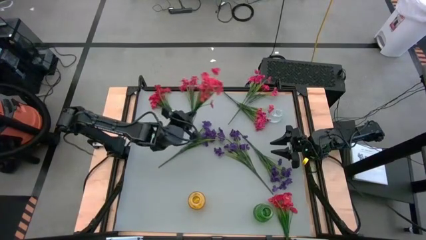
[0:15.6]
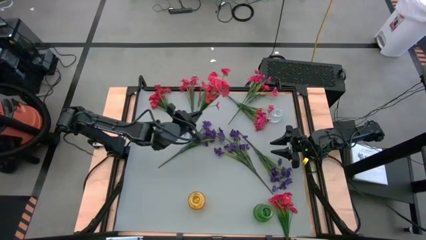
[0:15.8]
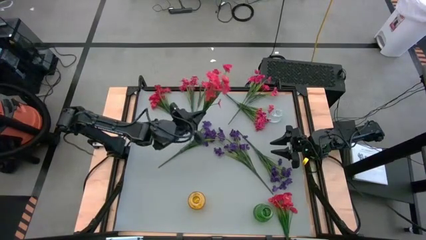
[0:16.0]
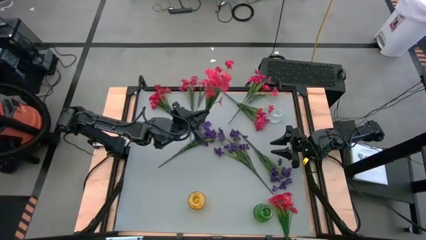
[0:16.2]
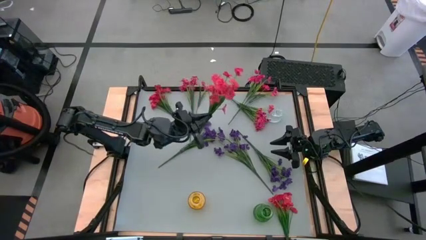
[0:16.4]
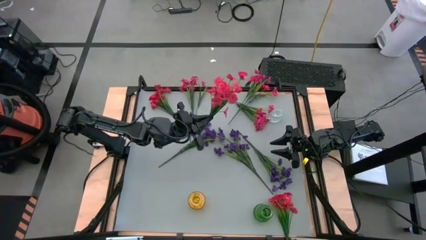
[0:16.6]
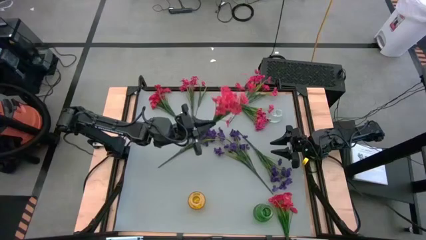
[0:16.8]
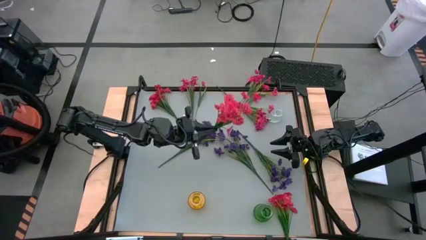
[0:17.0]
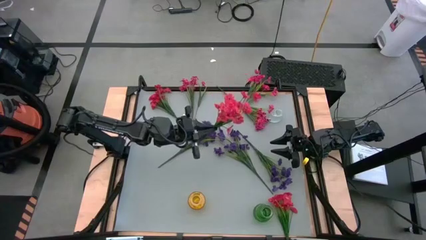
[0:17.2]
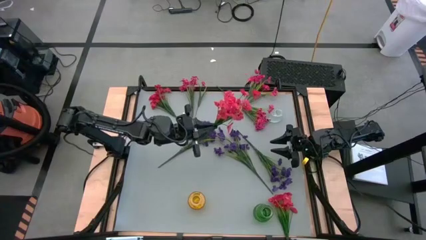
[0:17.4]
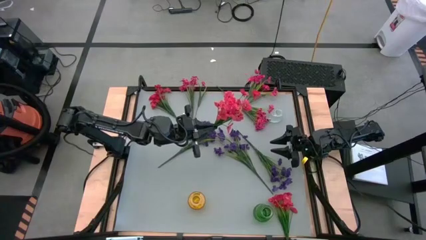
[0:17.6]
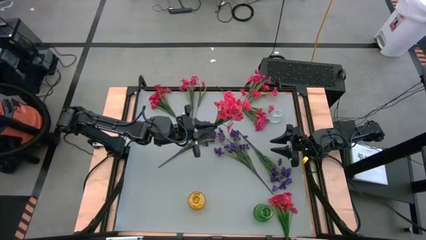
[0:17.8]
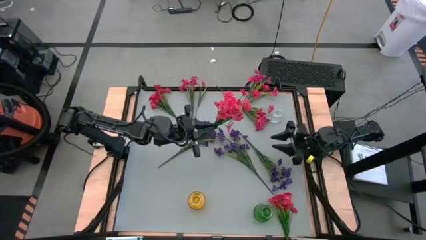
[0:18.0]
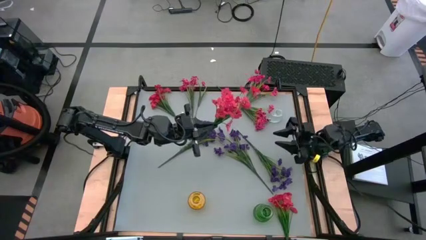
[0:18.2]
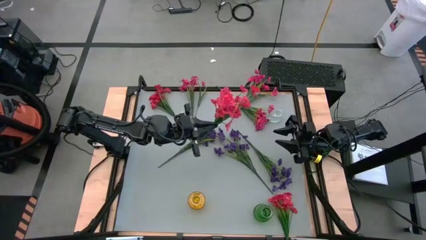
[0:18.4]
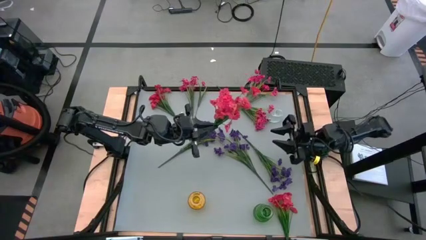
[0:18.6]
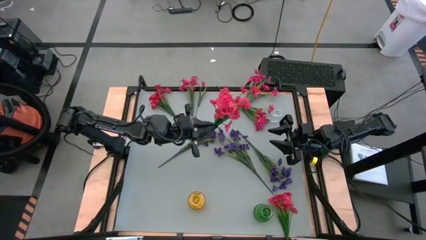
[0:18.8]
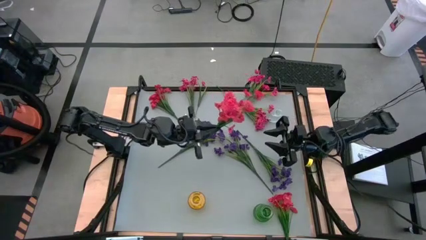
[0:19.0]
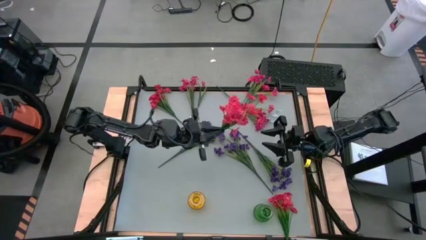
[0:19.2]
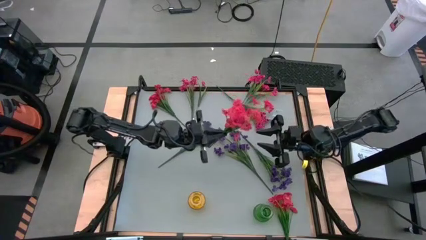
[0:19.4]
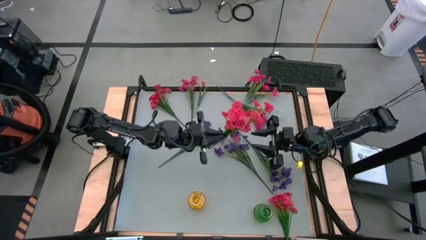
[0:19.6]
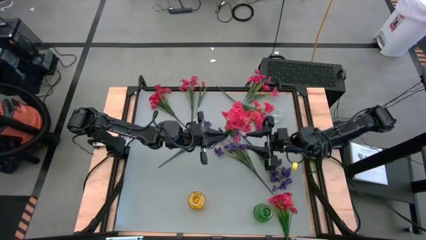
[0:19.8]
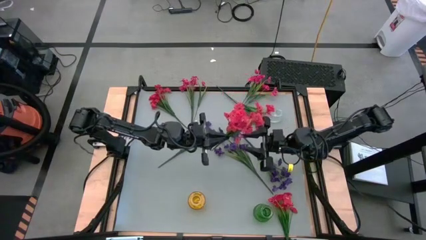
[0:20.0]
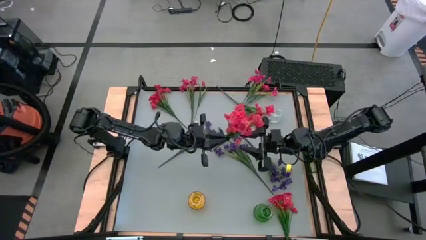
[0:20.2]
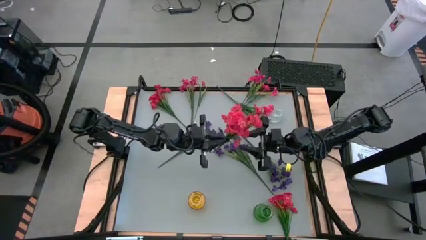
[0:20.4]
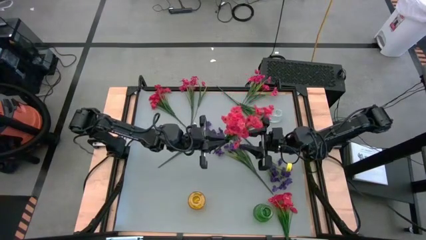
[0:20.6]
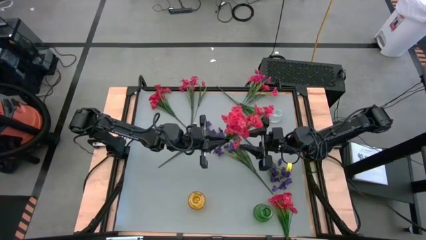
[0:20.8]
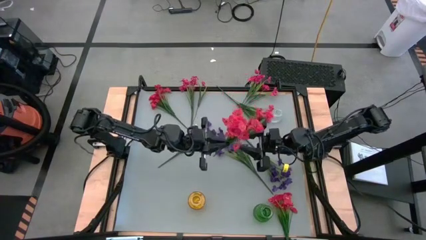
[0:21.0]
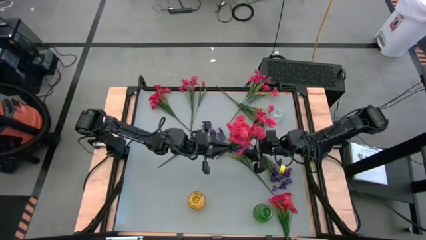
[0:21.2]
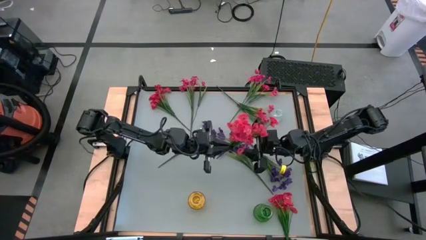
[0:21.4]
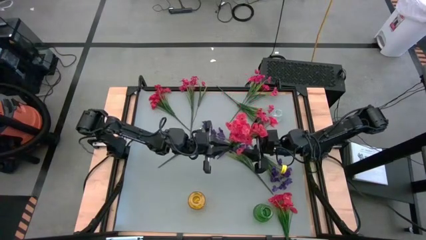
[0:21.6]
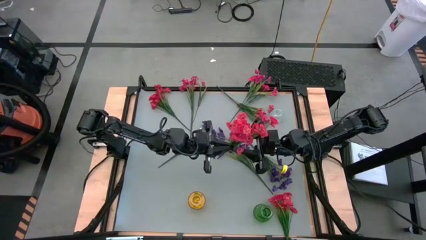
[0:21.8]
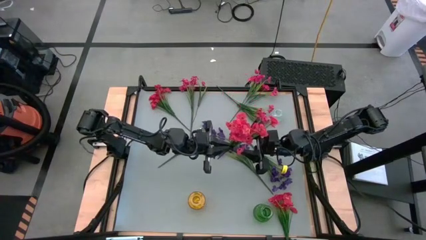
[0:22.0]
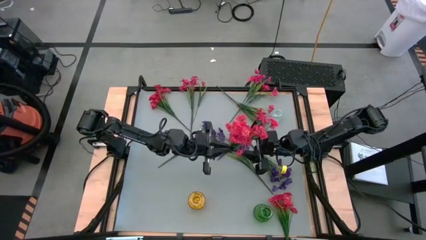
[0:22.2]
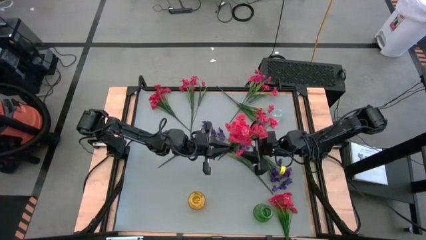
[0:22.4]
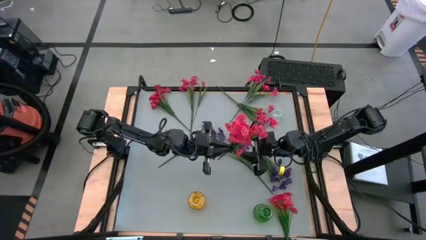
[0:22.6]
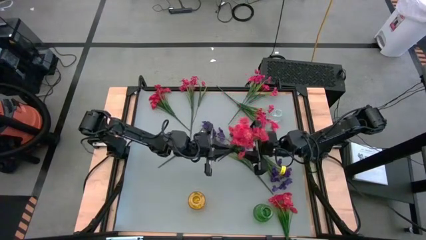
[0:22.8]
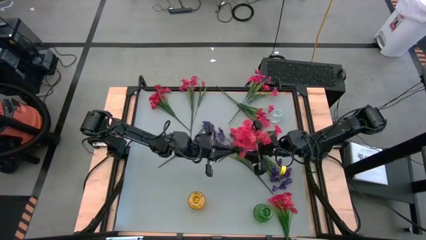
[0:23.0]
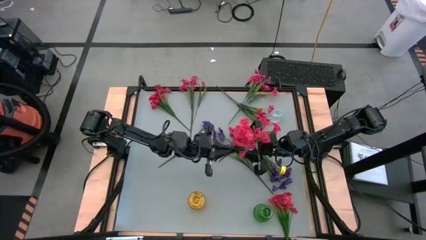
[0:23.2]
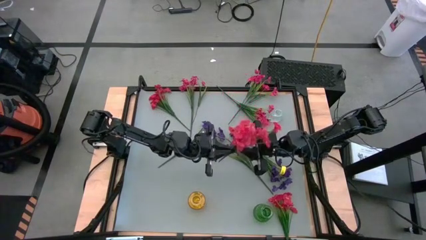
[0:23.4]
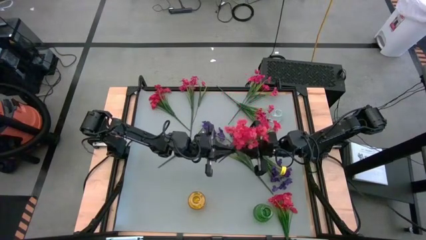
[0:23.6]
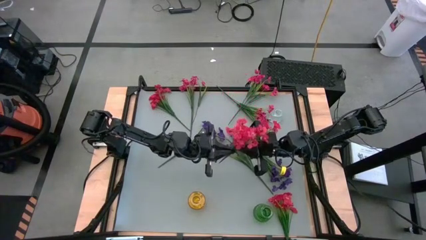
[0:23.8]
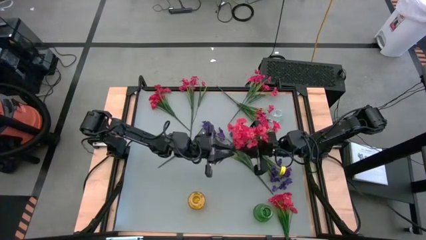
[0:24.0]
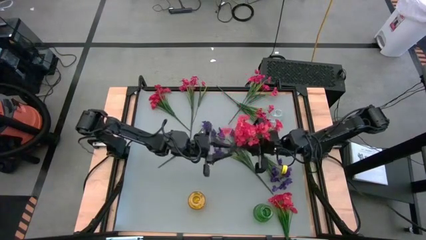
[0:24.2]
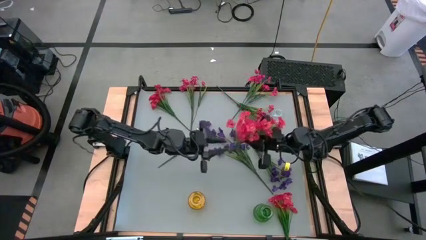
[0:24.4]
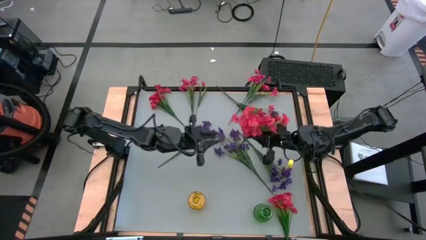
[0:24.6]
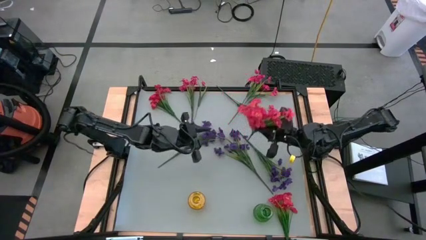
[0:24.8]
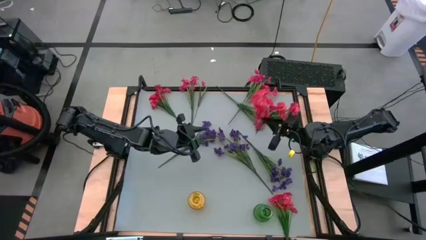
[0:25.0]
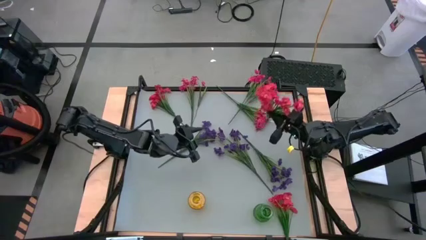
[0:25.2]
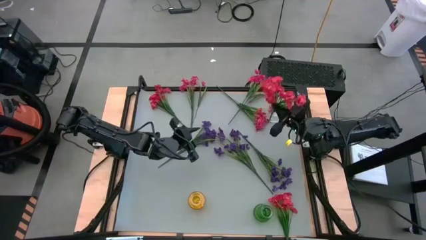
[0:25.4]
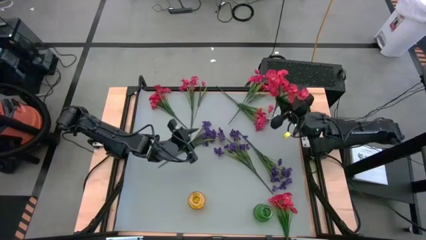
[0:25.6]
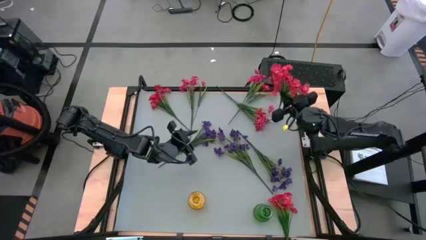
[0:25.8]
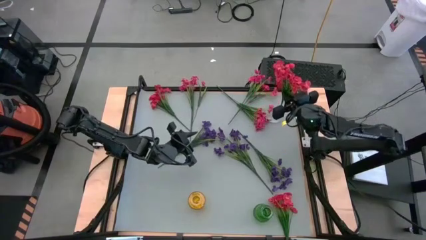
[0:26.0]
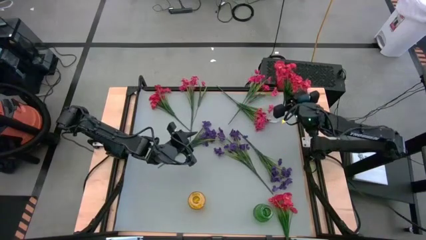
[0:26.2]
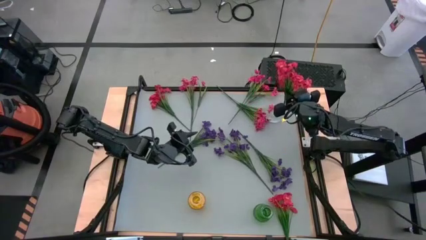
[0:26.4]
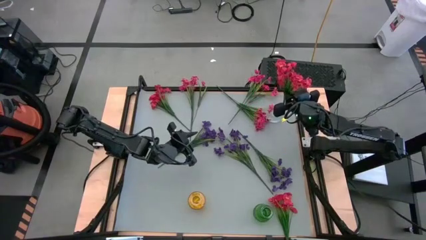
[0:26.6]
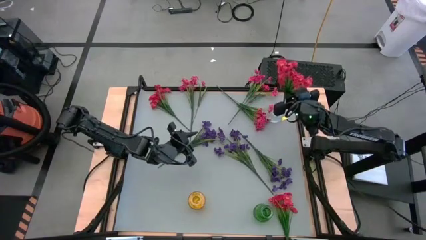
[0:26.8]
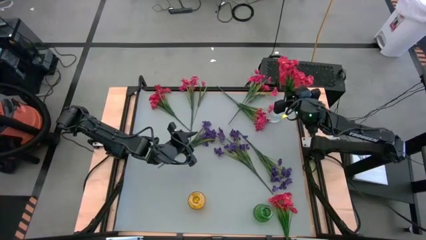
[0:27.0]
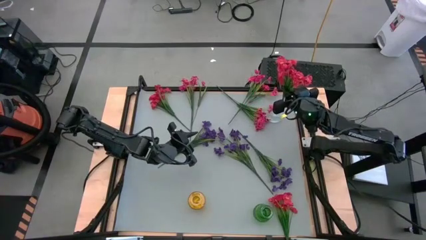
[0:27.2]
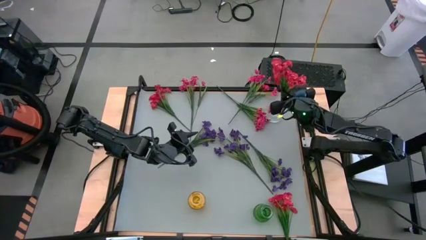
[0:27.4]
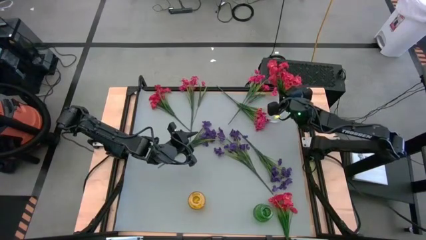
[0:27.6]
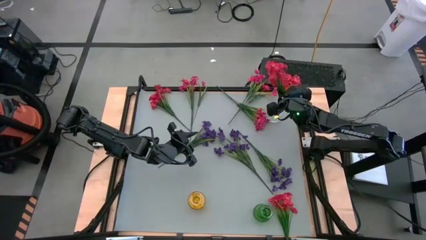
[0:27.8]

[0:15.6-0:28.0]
Task: Sort flowers into vase by color
Put the bottom left red flower into the transparent vase

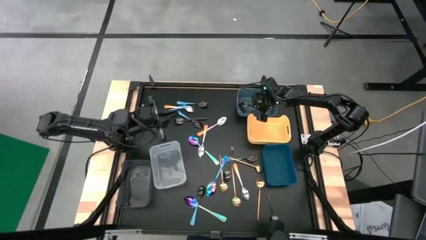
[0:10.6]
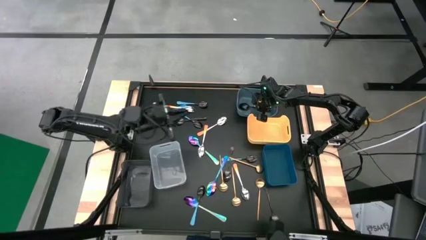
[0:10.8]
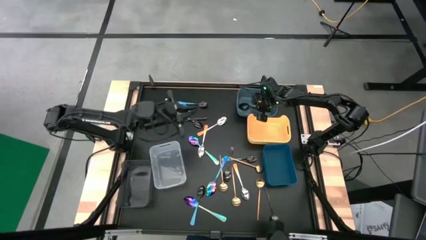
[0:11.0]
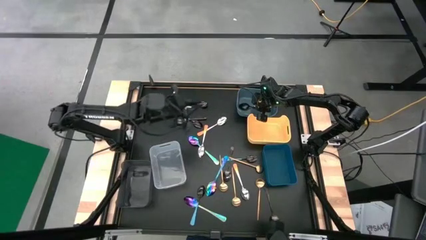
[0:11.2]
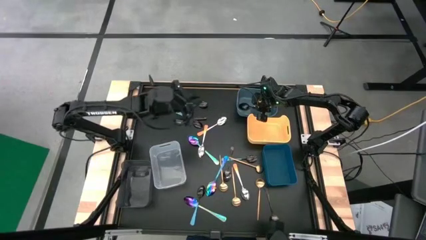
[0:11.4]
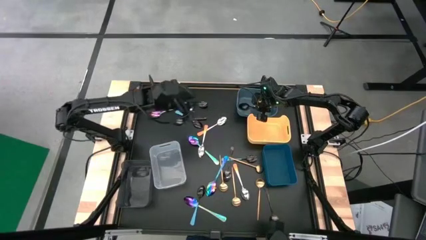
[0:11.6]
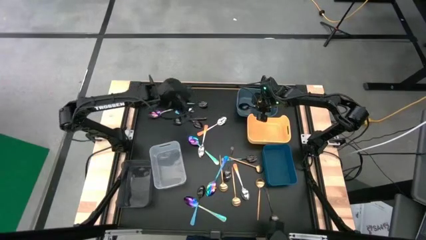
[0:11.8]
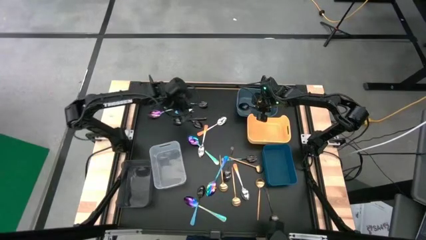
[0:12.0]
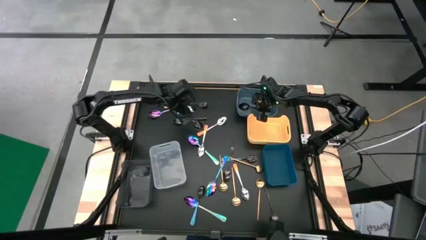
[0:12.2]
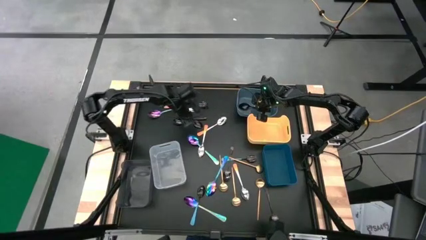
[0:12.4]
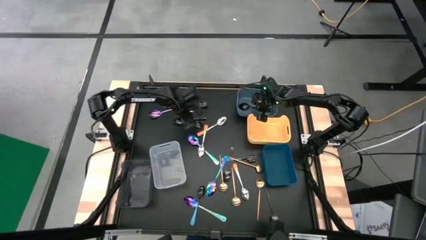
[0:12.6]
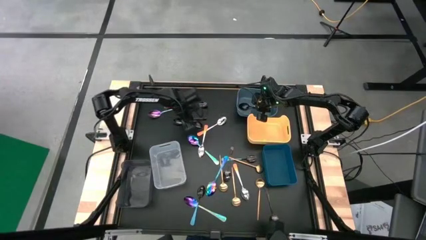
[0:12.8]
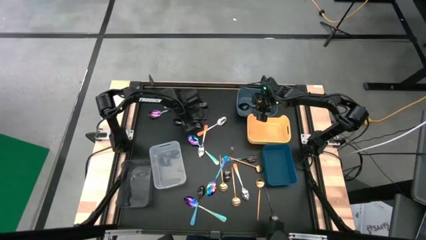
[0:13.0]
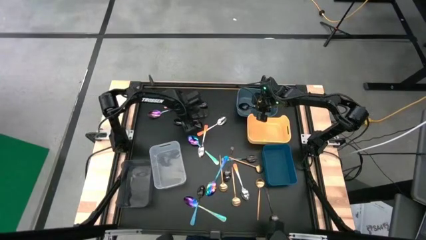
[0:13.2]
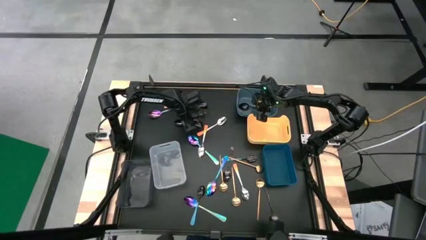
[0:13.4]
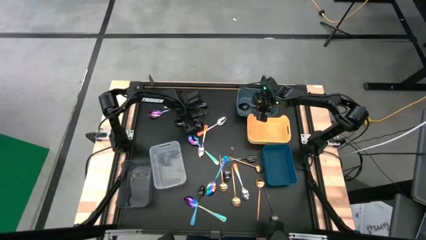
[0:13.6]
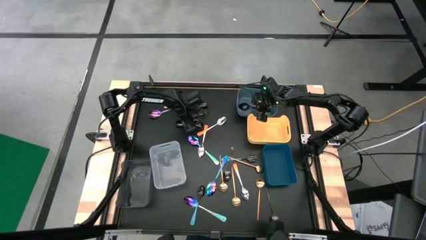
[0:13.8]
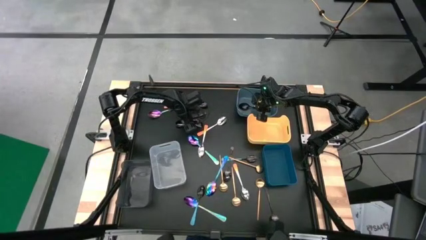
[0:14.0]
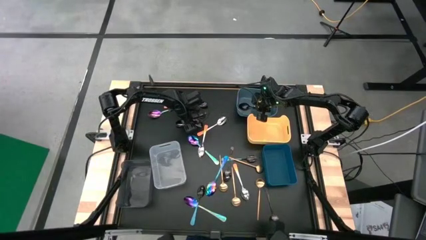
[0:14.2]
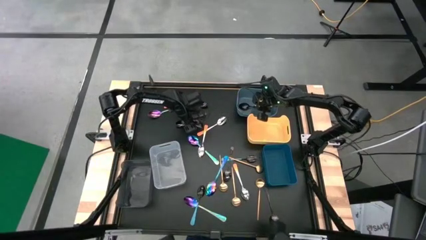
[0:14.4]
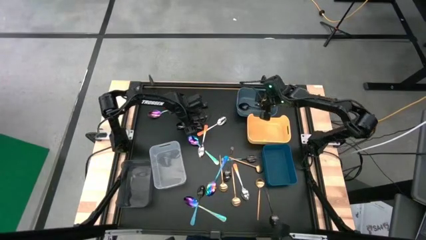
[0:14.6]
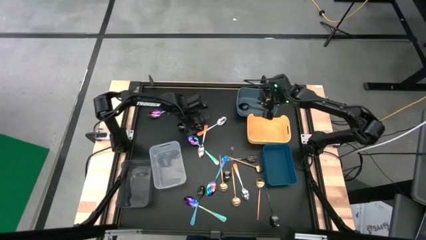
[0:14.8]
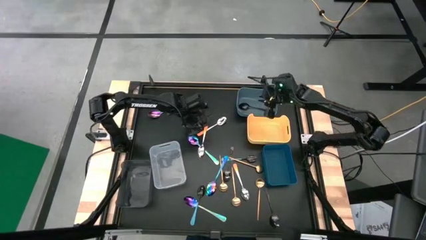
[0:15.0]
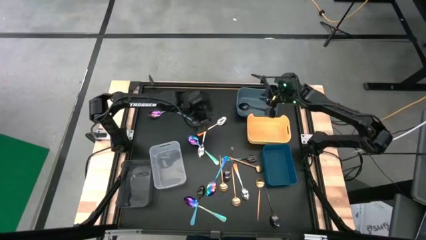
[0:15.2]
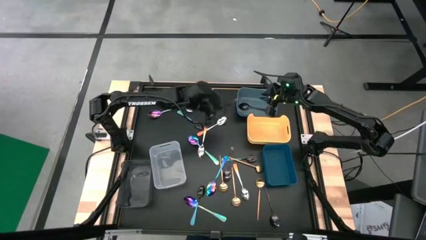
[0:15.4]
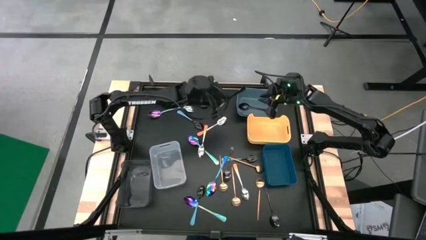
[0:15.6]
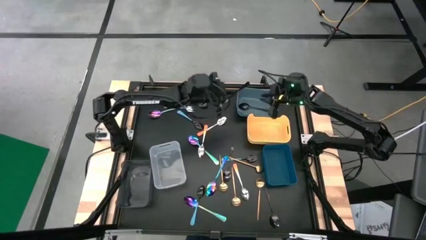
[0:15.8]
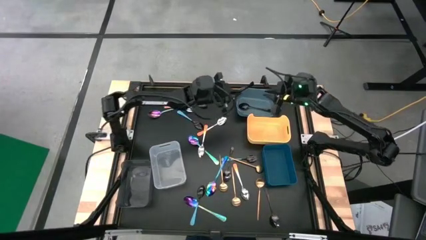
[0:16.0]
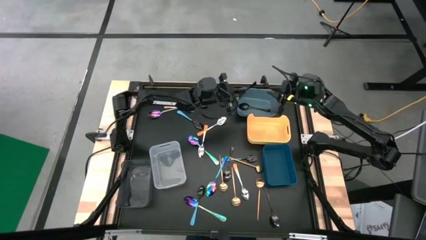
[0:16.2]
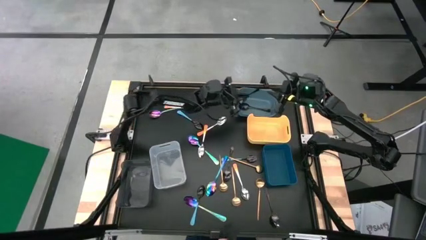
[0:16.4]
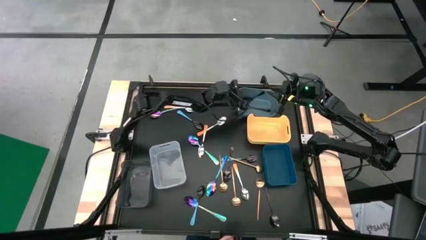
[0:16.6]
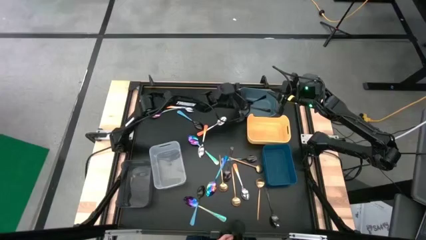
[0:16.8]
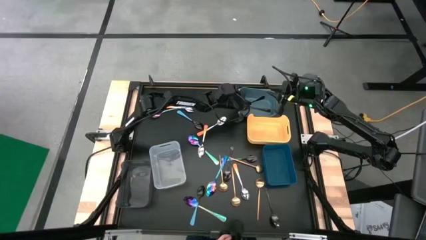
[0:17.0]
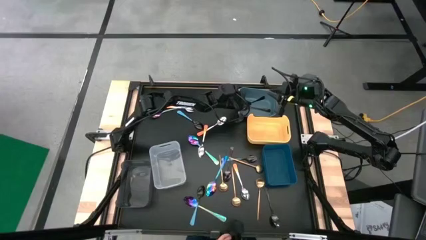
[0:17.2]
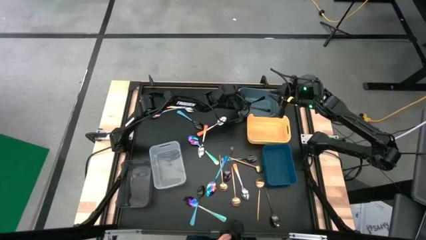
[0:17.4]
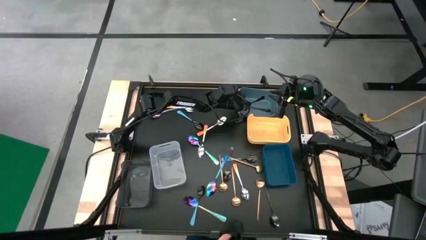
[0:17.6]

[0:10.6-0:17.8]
Task: Sort silverware by color (type)
Put the black spoon into the light blue bin
